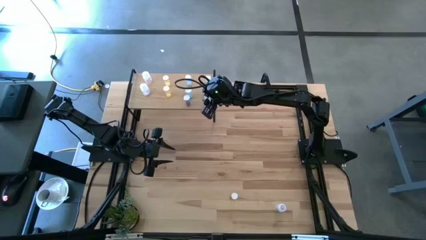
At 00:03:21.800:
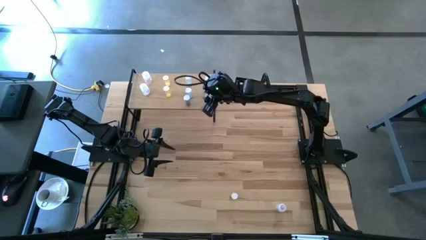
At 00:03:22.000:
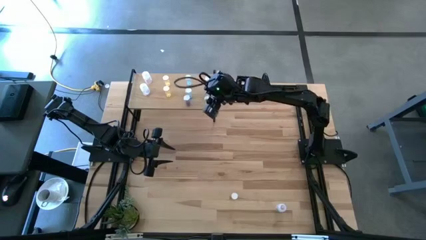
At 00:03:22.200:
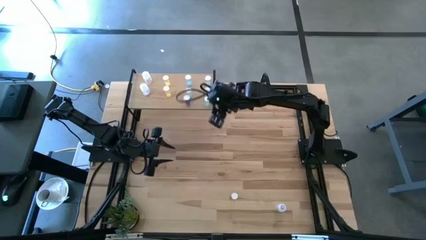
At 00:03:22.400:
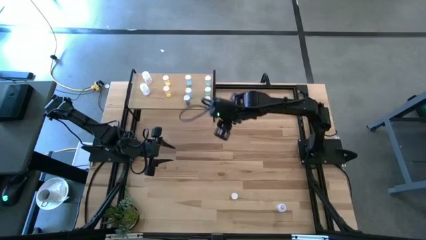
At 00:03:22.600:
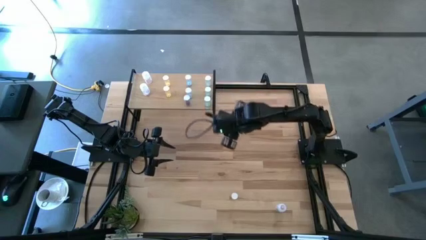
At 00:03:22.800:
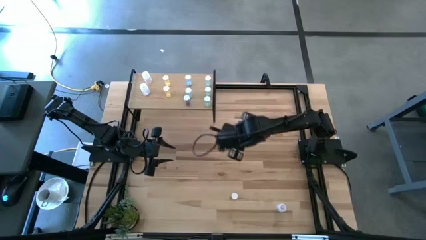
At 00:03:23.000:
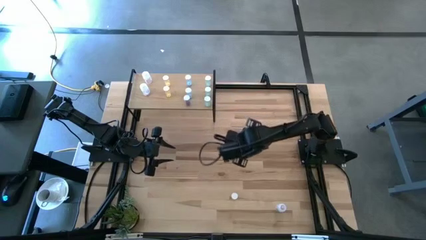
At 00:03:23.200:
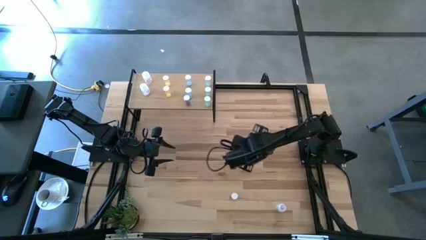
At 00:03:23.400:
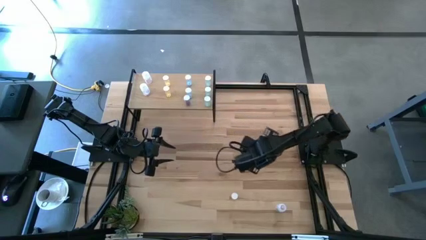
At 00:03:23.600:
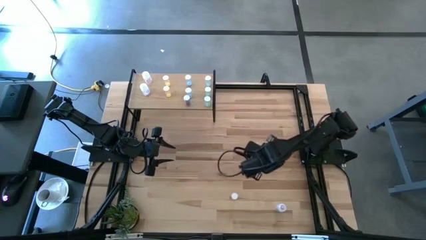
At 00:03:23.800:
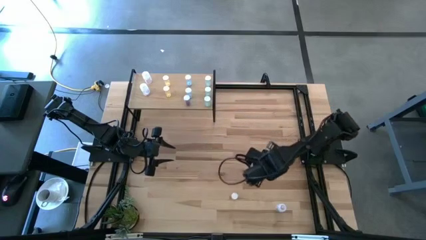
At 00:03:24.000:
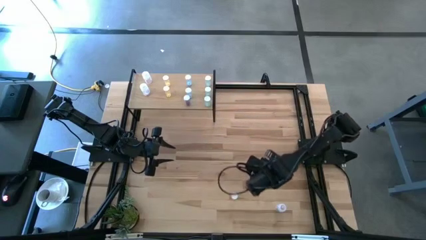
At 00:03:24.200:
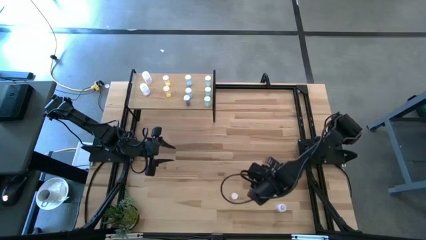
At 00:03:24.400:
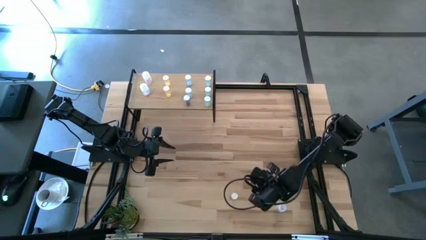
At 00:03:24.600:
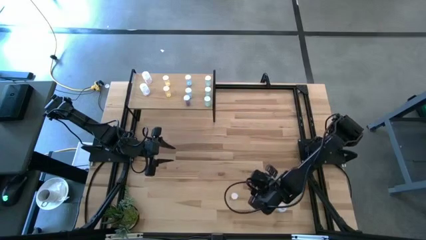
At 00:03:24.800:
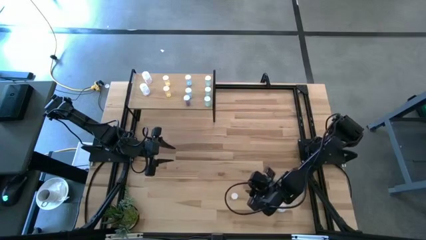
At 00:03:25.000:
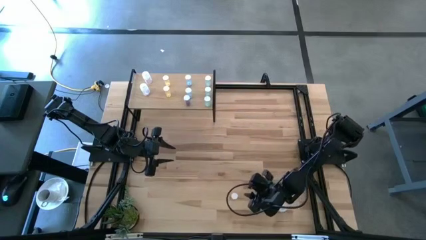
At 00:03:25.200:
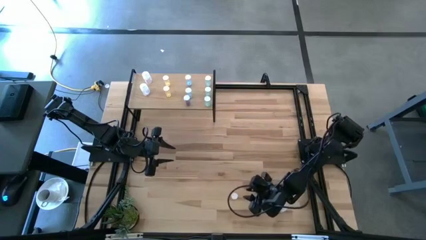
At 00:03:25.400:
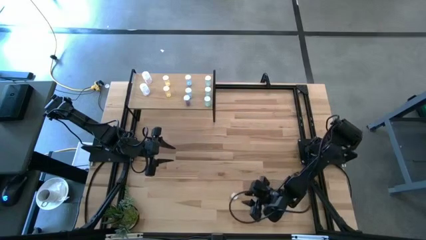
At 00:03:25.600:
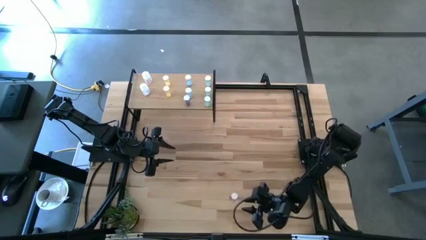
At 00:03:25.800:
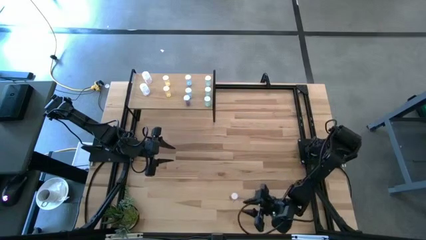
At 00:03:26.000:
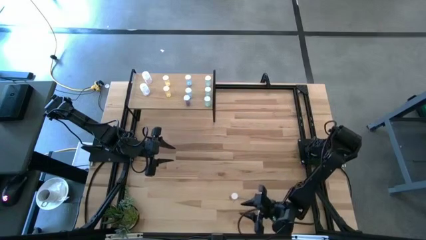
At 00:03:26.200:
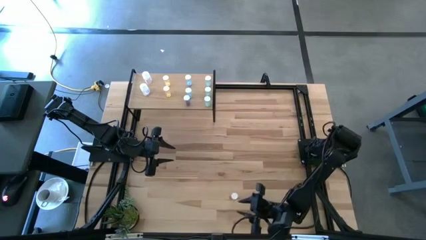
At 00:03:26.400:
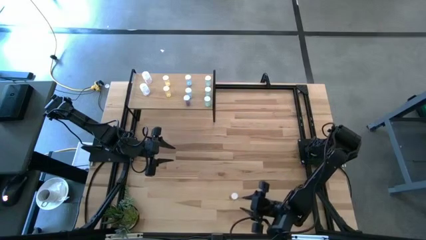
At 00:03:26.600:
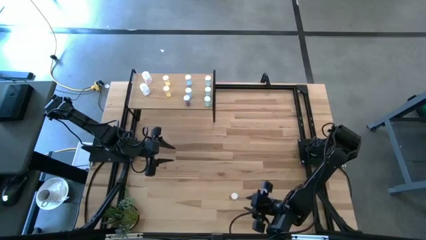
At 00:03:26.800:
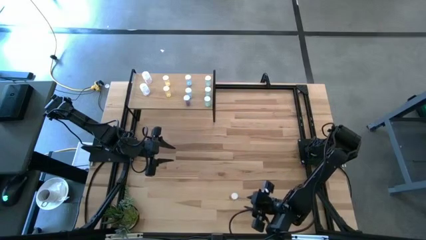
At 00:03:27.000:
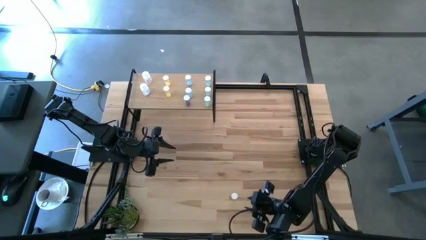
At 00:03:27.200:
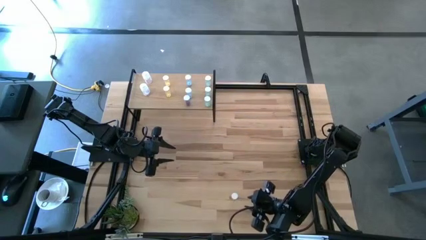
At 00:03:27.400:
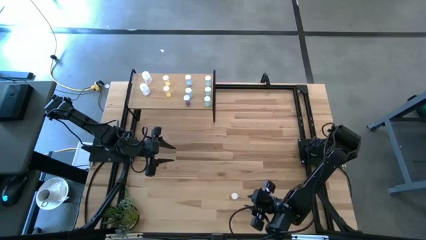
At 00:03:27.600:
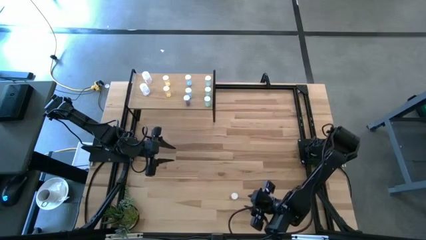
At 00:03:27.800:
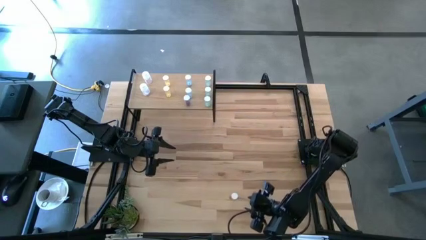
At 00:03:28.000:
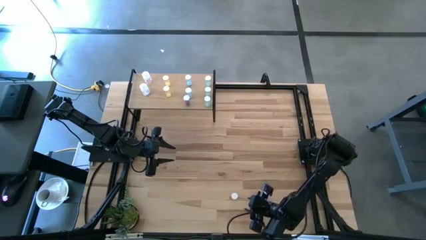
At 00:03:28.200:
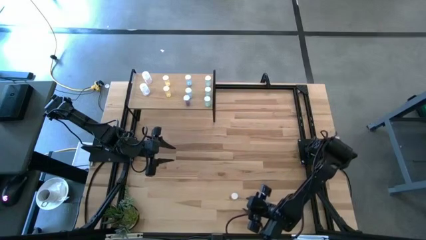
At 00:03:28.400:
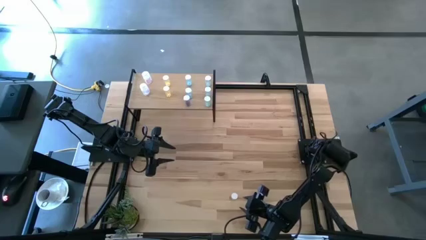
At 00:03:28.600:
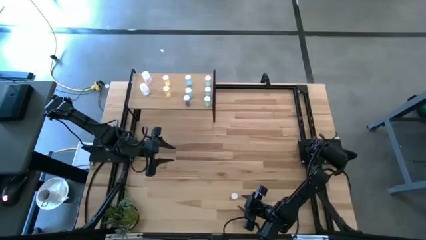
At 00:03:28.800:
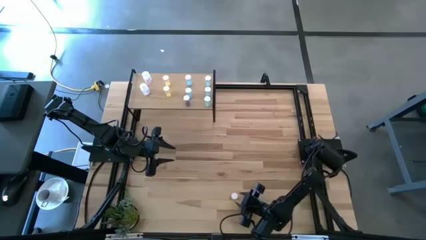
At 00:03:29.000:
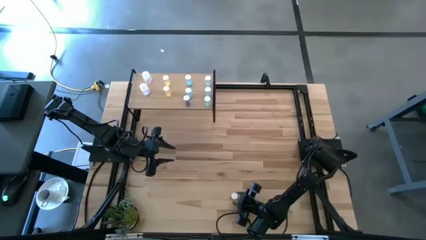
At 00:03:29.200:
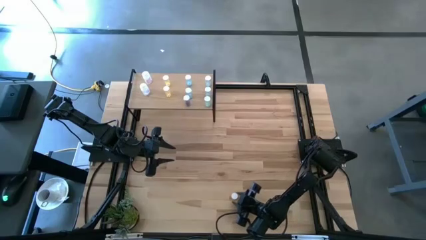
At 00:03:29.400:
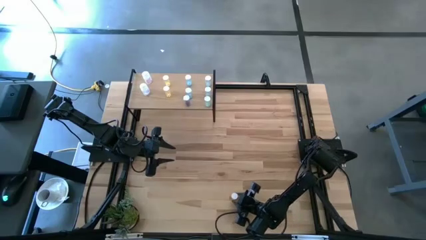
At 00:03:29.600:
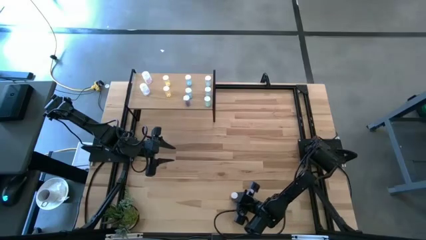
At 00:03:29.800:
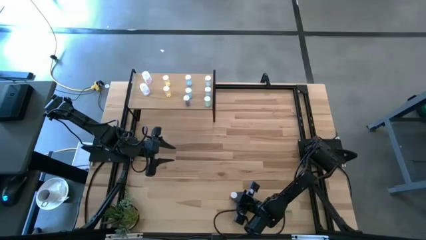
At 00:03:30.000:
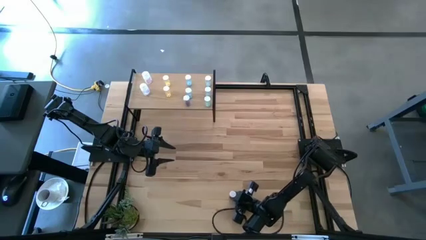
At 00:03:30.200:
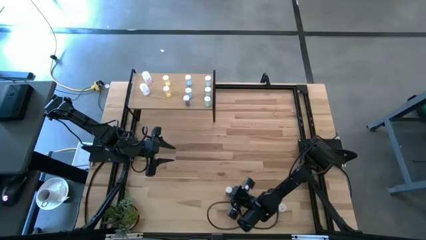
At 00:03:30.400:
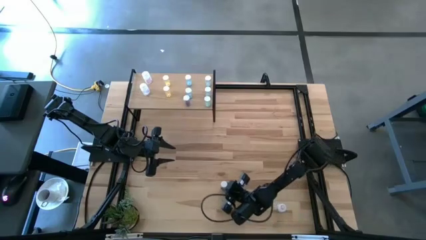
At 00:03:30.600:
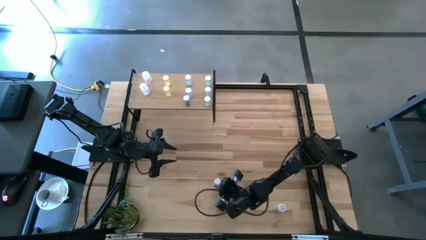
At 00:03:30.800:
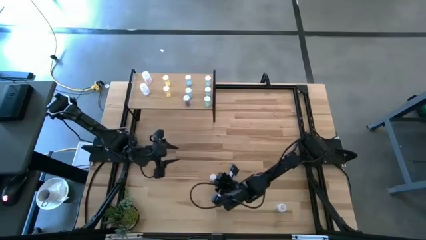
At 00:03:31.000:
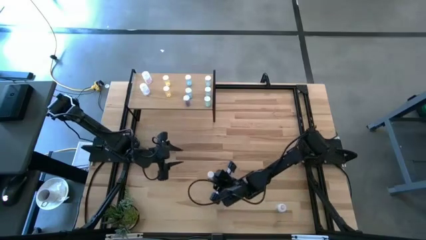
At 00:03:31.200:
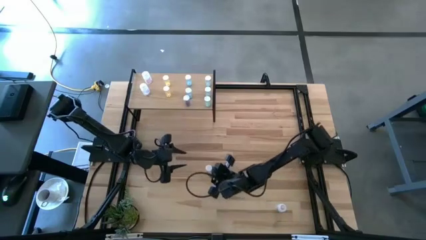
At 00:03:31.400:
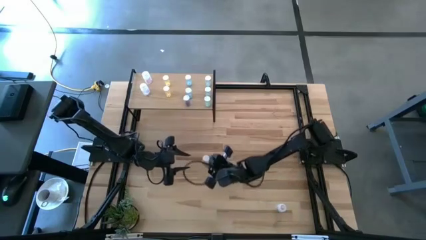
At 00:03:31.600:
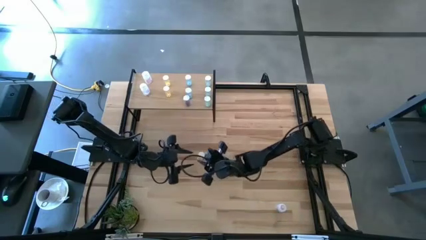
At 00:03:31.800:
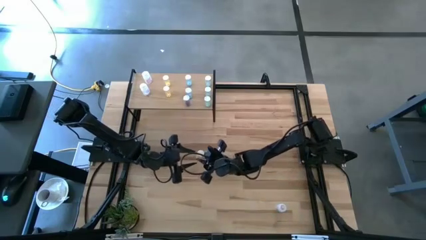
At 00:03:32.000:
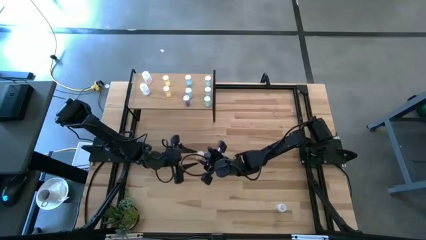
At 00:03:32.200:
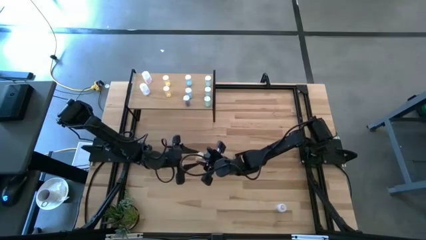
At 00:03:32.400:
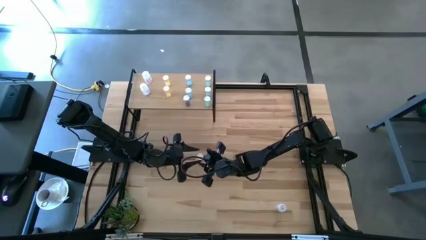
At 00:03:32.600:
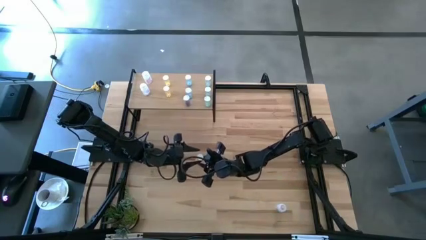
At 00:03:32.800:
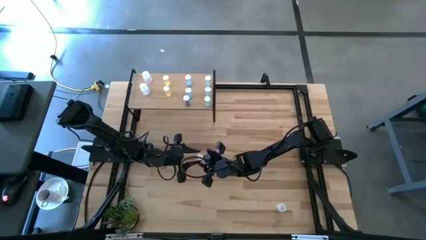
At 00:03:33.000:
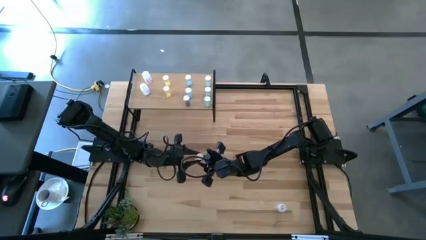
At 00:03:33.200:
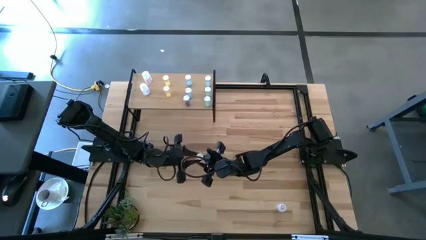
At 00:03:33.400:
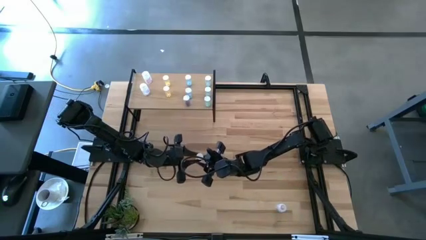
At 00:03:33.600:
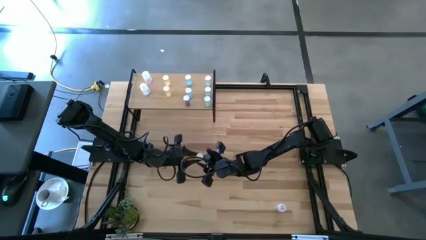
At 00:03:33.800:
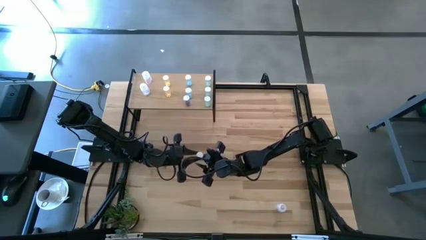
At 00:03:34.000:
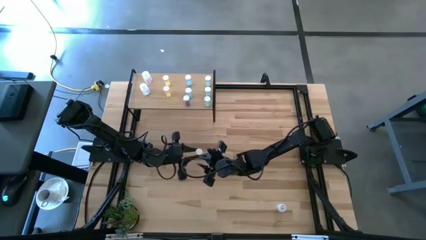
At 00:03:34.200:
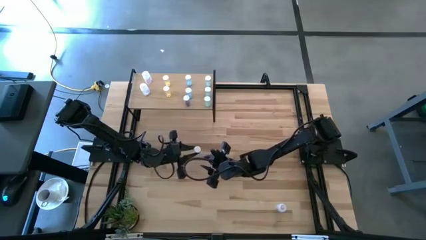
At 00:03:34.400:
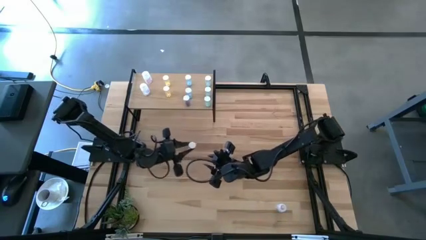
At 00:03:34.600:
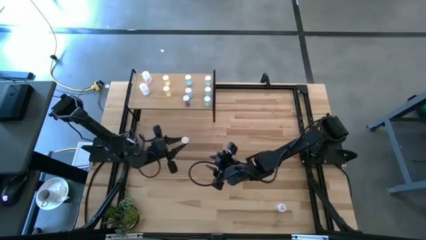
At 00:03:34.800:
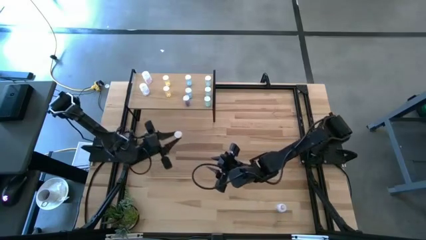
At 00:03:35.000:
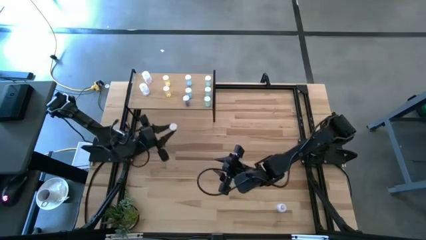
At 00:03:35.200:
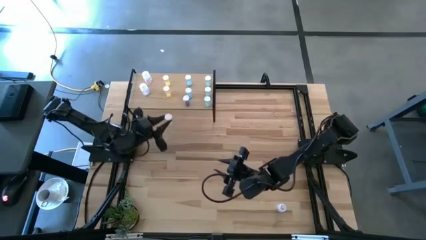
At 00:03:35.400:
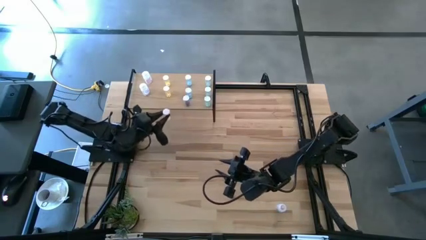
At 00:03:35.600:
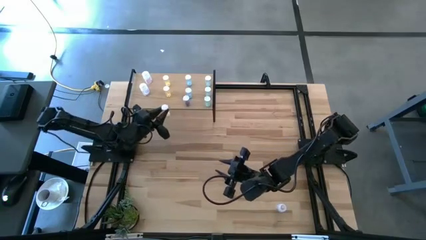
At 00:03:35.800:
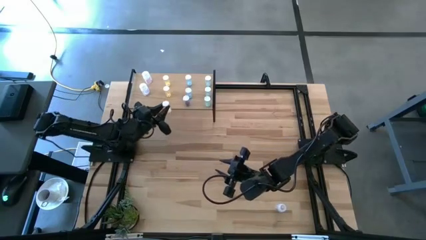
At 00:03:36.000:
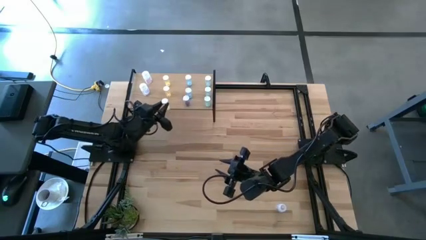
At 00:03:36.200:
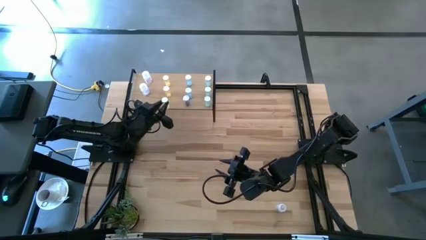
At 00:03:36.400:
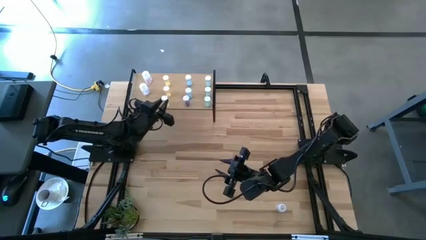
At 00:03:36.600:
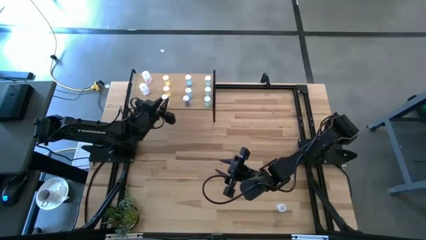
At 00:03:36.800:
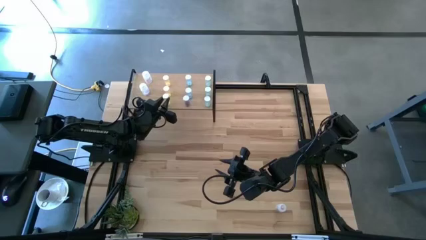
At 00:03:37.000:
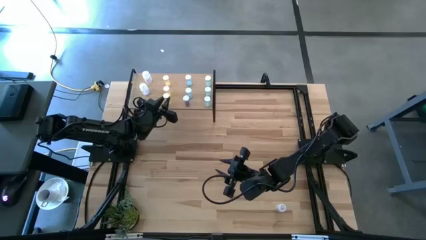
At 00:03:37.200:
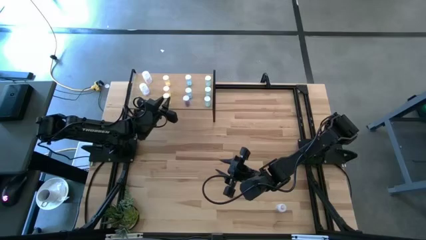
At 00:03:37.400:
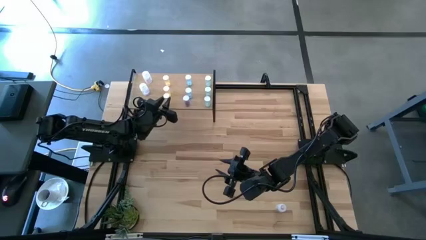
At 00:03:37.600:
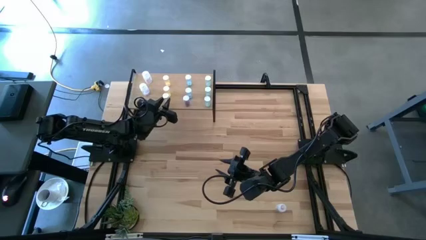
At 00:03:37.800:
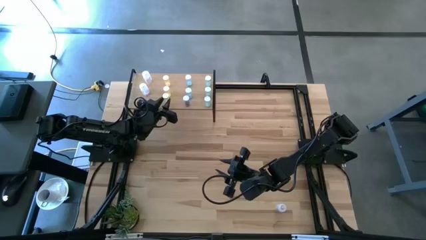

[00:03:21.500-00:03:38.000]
Task: Pick and place medicine bottles onto shelf by color
Put the yellow pill bottle on the shelf aligned with the other yellow pill bottles
